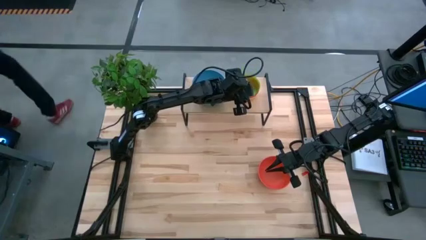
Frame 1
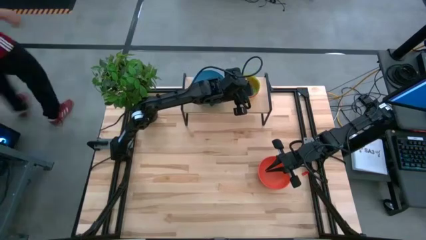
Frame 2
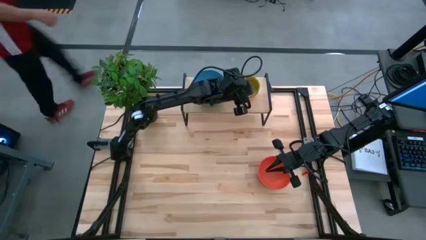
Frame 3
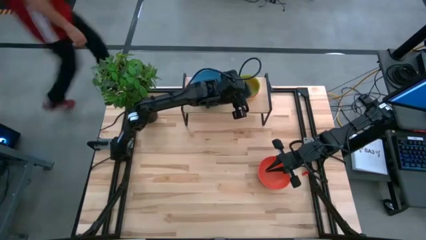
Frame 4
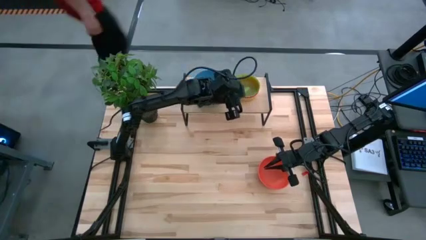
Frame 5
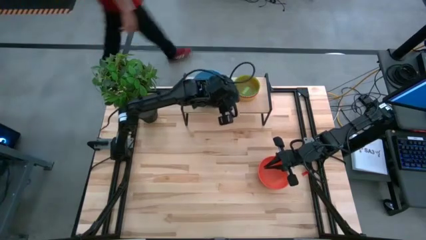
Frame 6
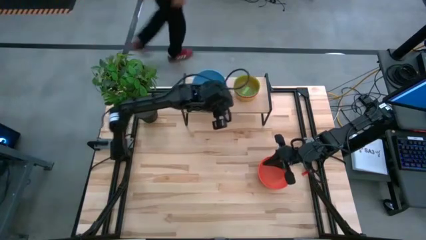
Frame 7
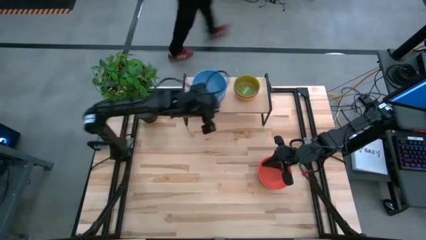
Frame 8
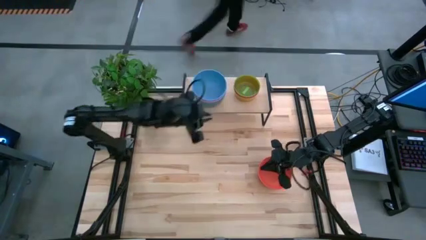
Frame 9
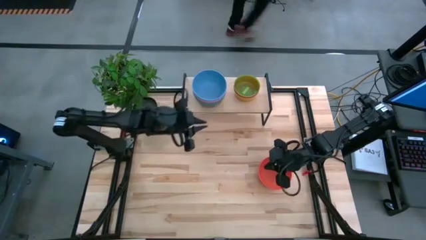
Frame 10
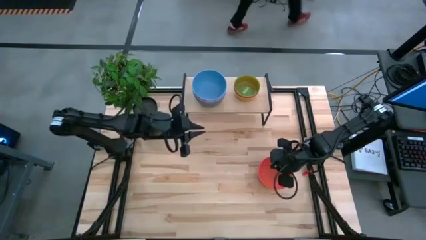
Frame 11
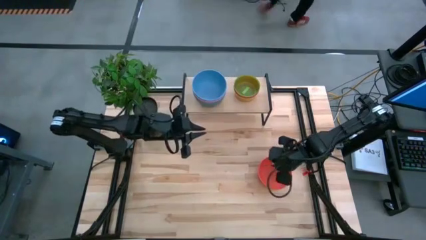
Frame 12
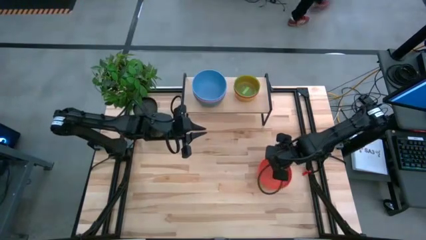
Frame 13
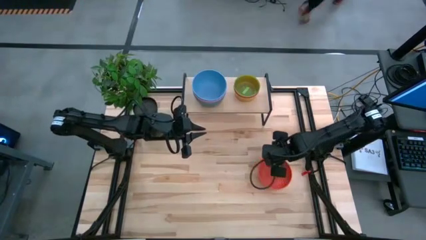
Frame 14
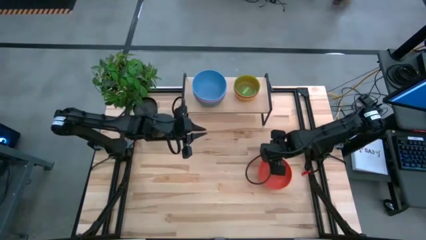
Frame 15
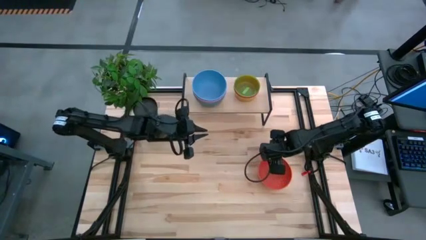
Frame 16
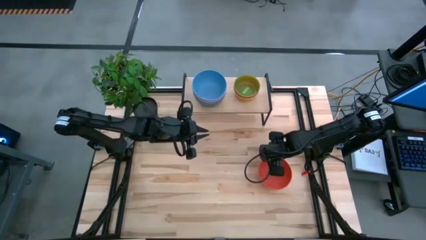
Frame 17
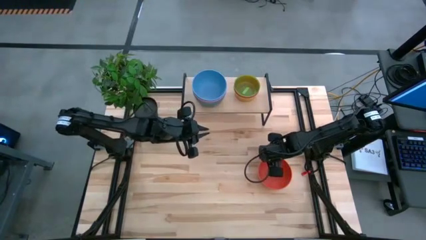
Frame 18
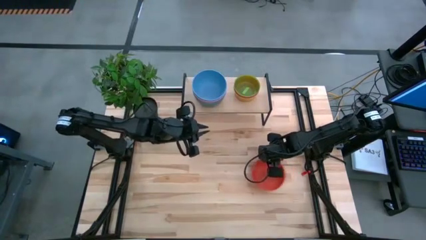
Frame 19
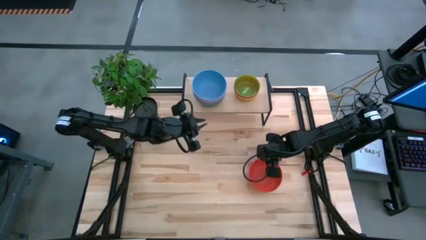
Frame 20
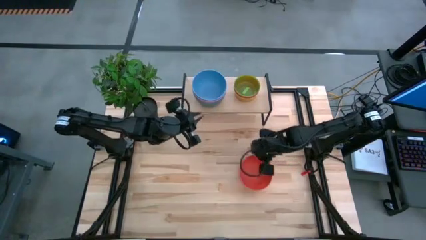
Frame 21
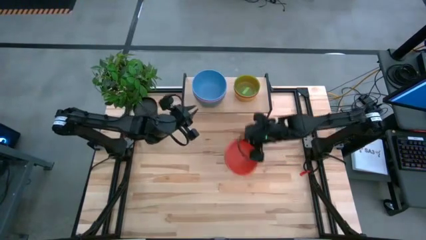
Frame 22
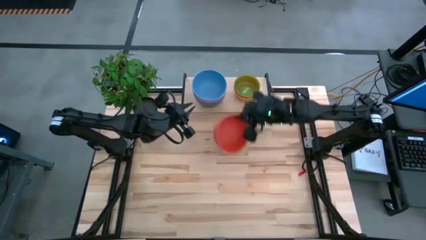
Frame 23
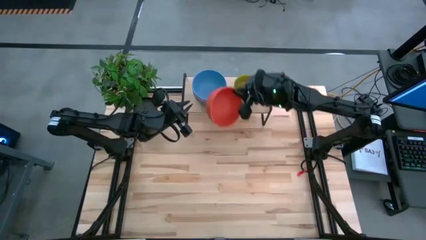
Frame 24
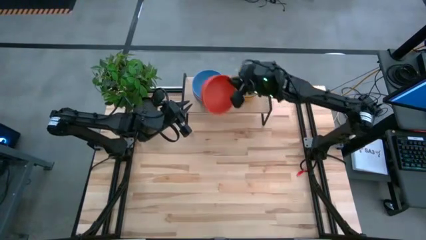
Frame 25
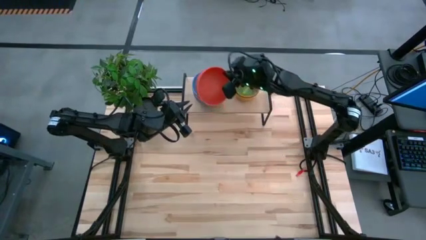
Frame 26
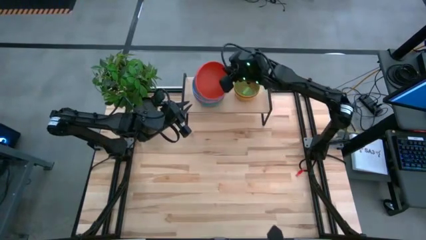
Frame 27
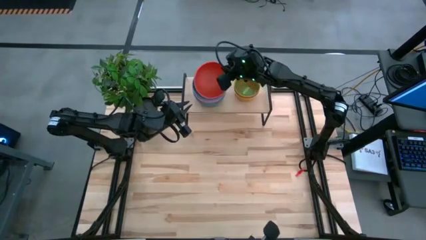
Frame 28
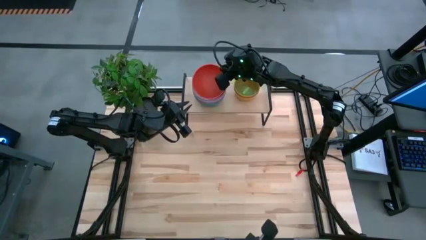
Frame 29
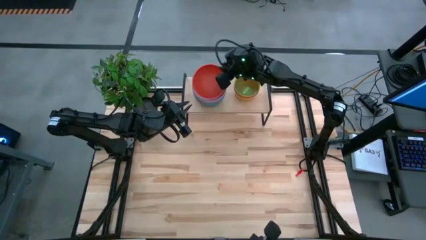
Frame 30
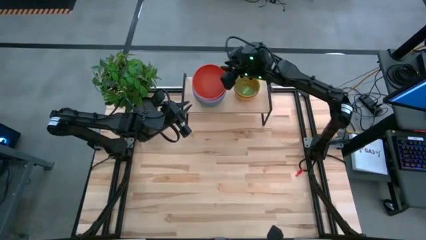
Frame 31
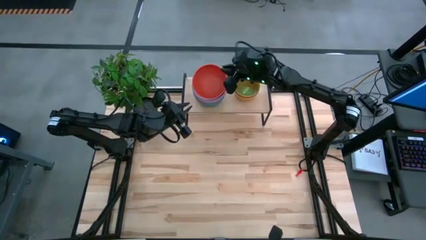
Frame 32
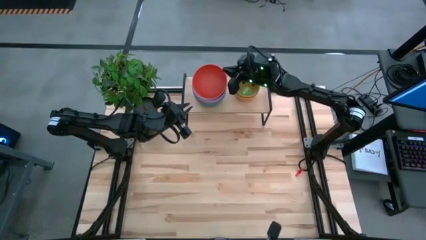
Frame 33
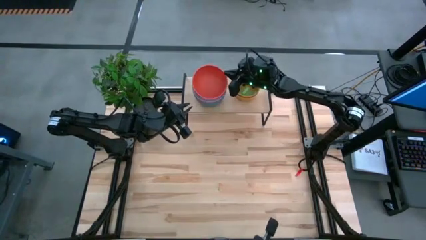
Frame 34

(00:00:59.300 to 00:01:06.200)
Task: Place and stack bowls onto a shelf
Stack the big orange bowl on top of the big blue bowl

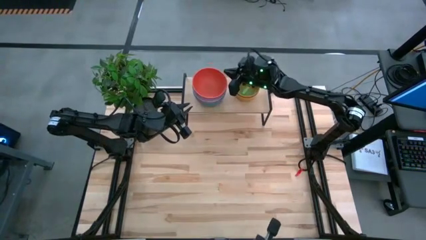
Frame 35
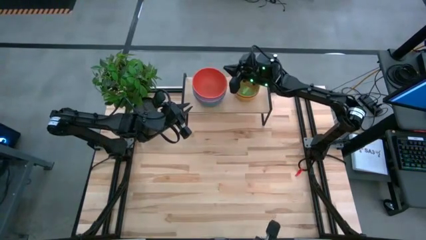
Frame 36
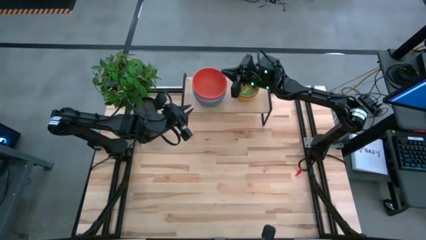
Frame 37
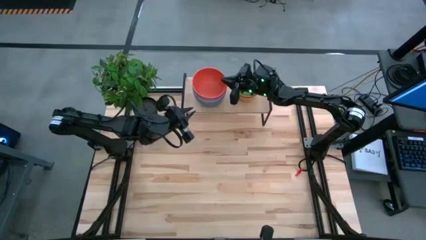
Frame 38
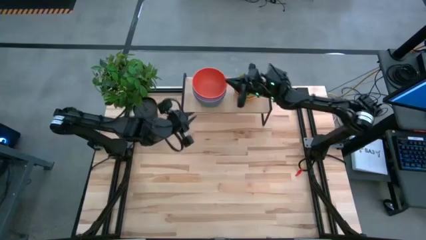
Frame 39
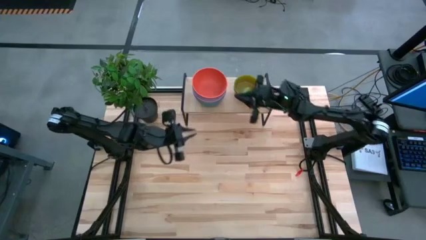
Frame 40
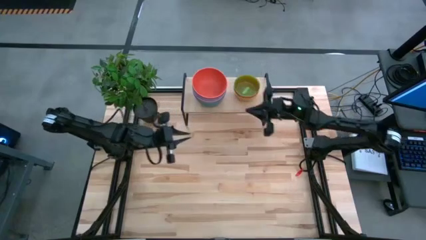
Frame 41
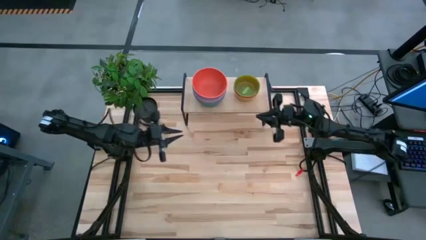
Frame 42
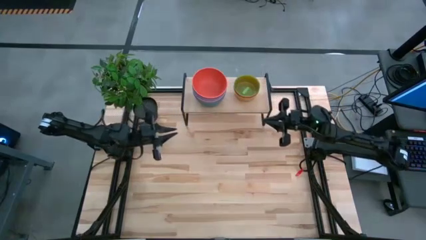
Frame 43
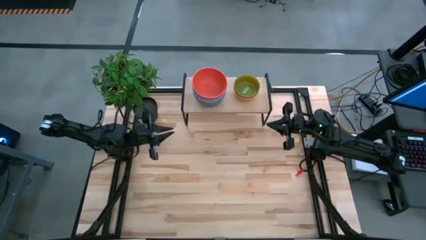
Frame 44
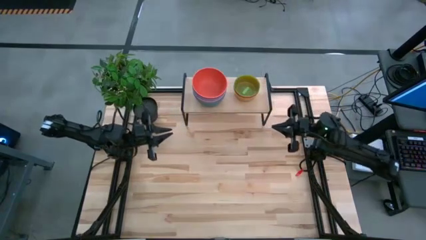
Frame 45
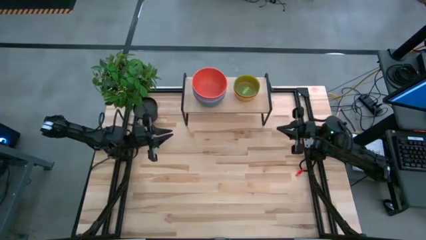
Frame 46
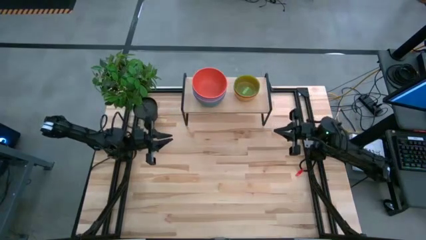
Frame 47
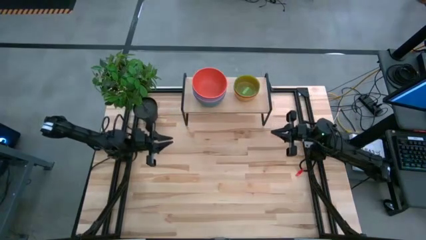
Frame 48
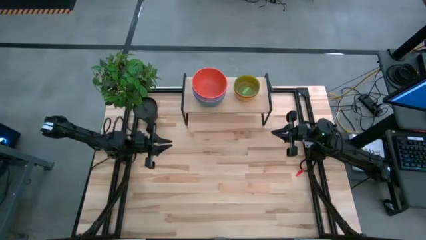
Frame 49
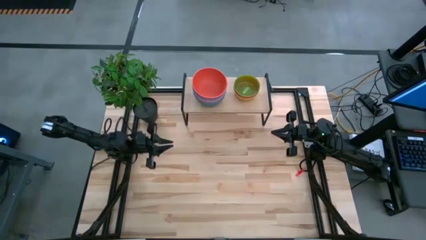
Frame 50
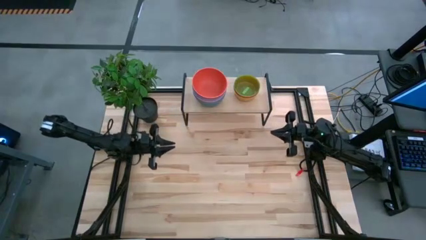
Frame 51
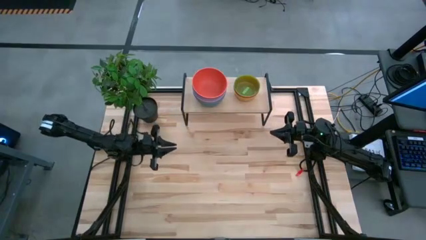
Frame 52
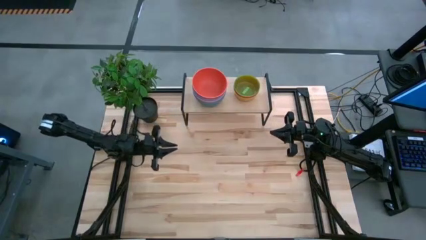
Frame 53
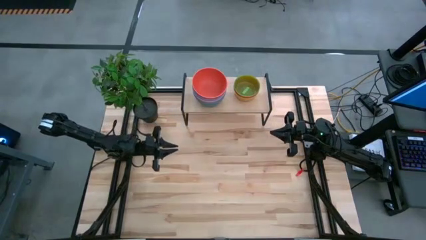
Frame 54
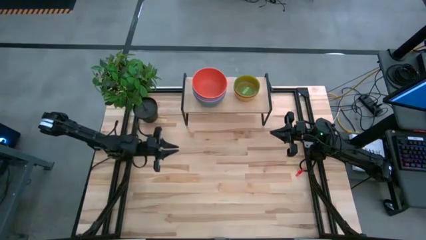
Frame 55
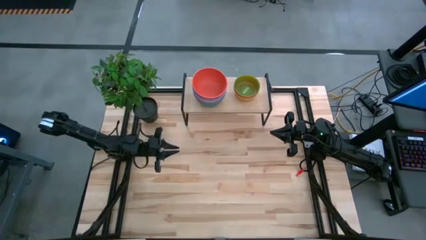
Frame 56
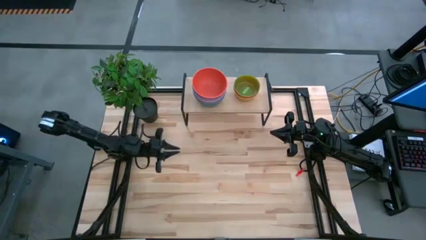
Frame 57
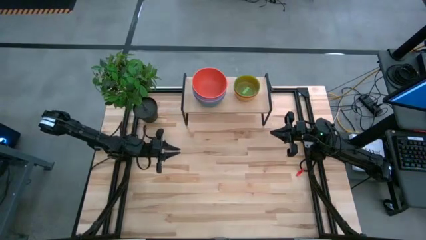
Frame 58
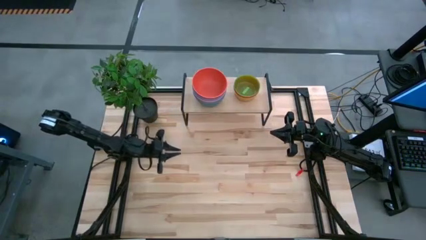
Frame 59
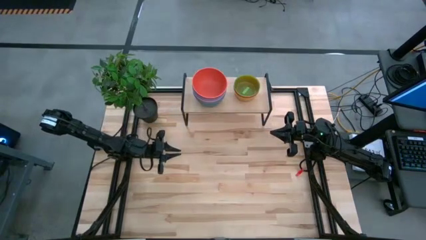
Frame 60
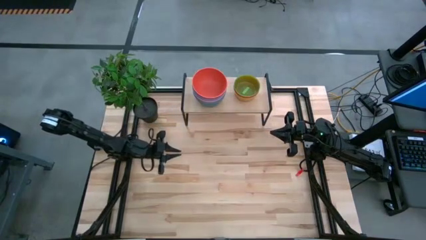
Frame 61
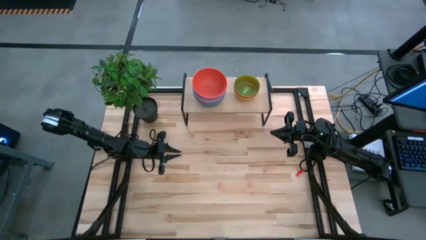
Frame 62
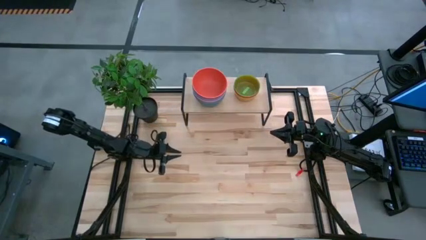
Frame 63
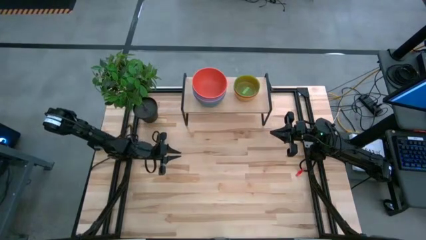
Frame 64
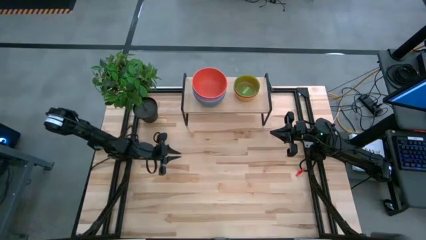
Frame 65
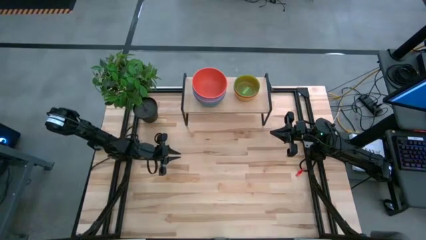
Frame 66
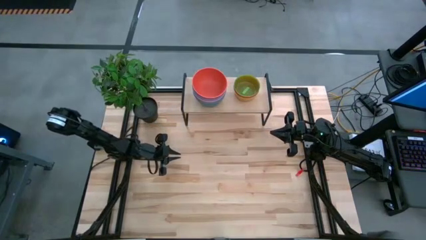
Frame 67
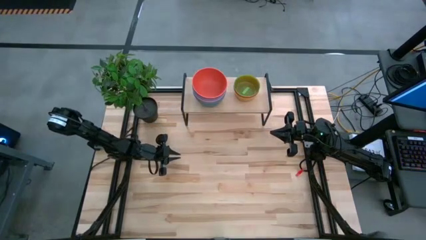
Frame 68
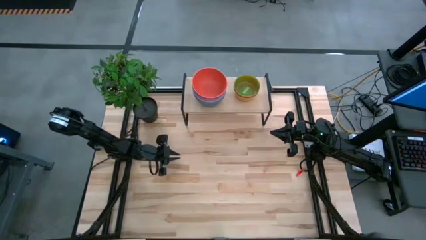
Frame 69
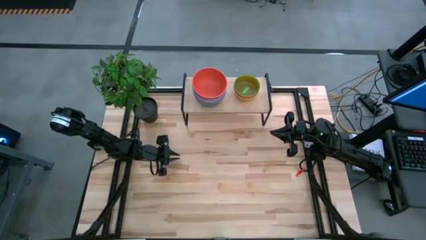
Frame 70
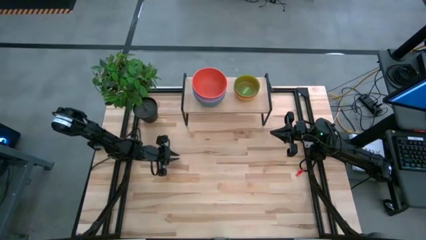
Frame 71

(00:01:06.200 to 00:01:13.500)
Return to Home Position
